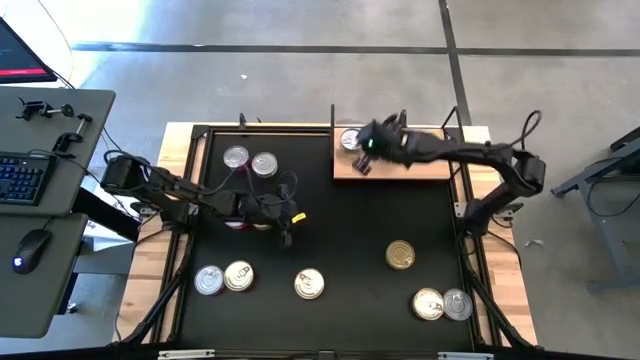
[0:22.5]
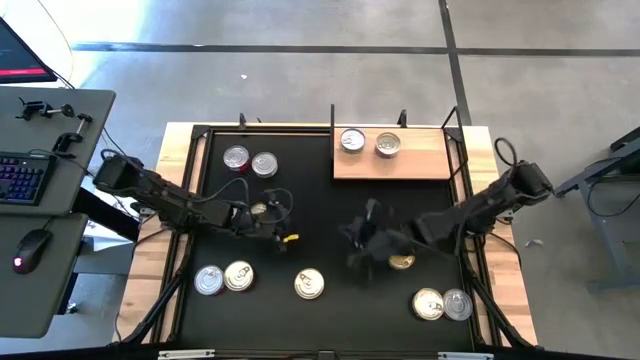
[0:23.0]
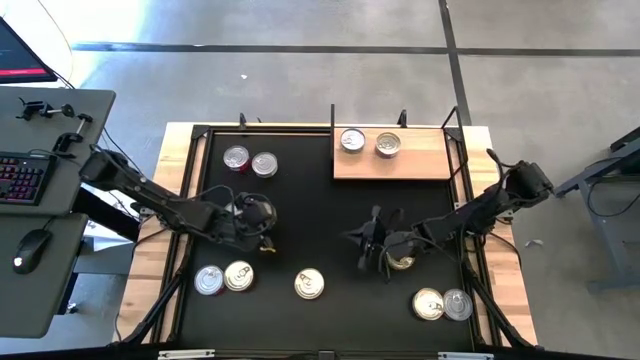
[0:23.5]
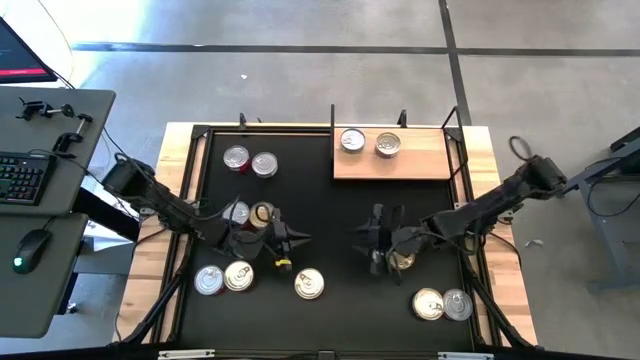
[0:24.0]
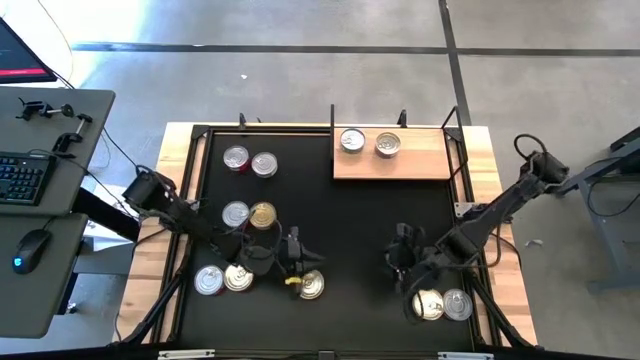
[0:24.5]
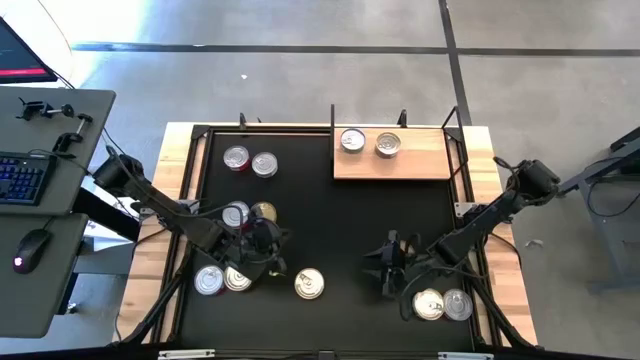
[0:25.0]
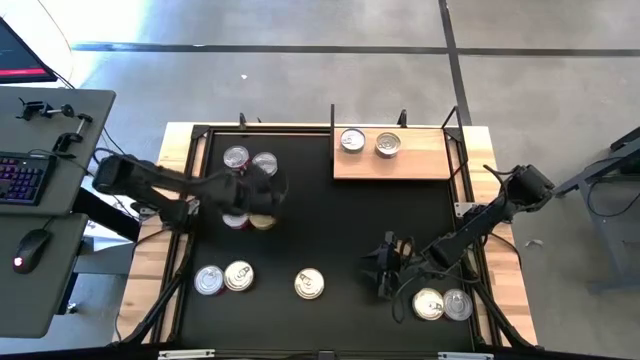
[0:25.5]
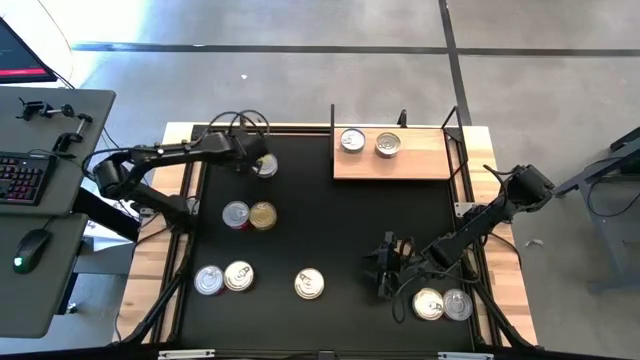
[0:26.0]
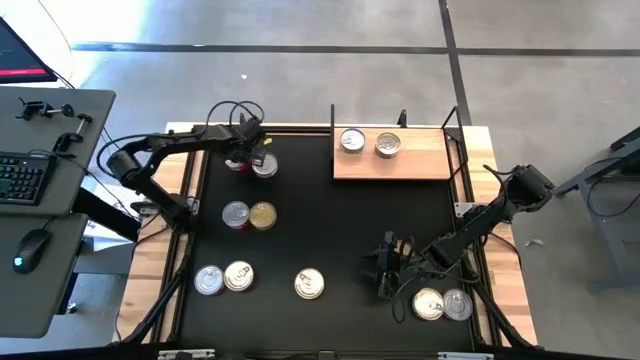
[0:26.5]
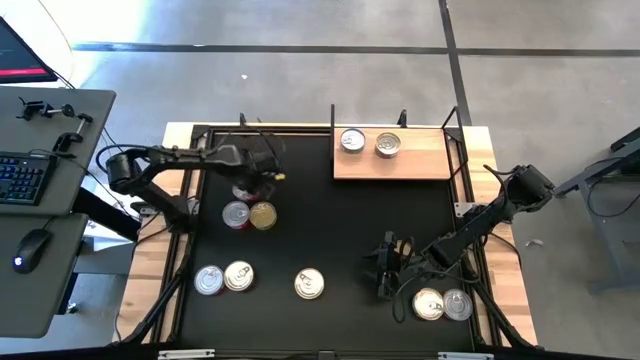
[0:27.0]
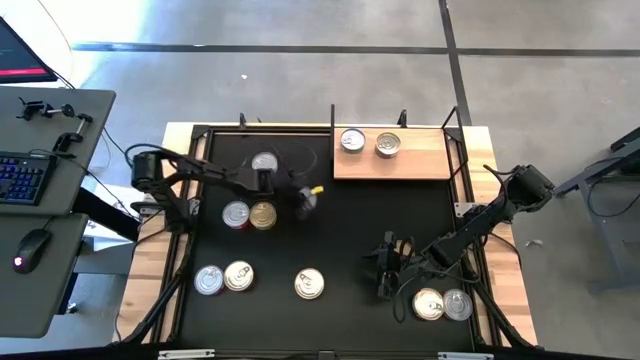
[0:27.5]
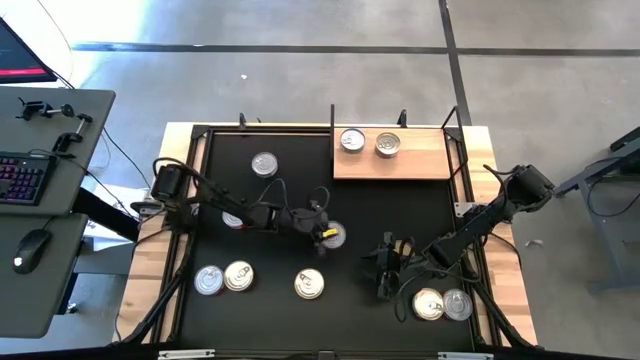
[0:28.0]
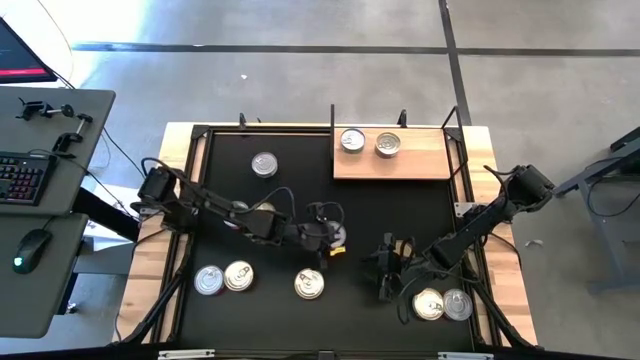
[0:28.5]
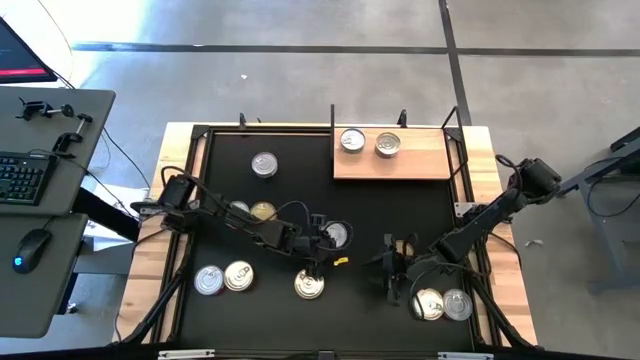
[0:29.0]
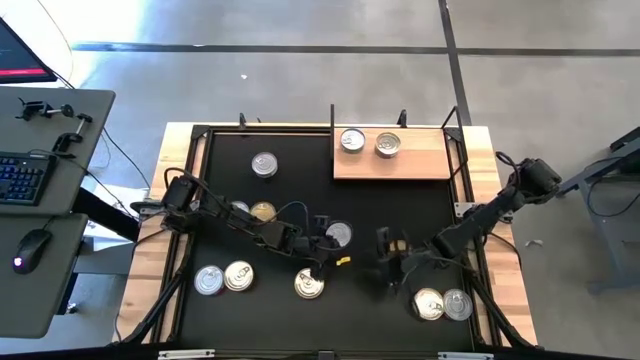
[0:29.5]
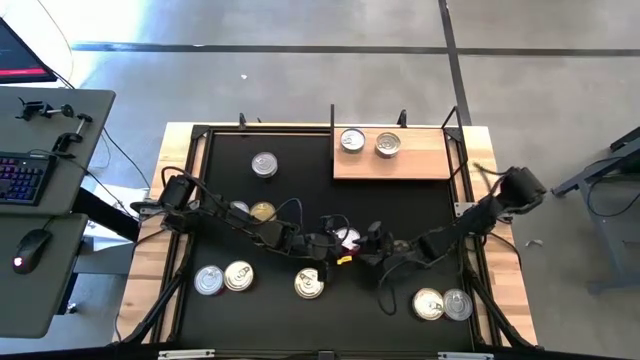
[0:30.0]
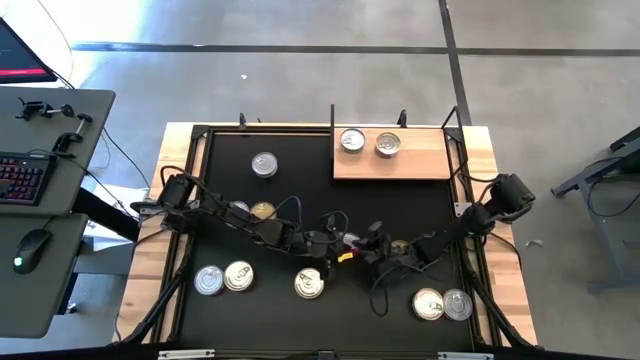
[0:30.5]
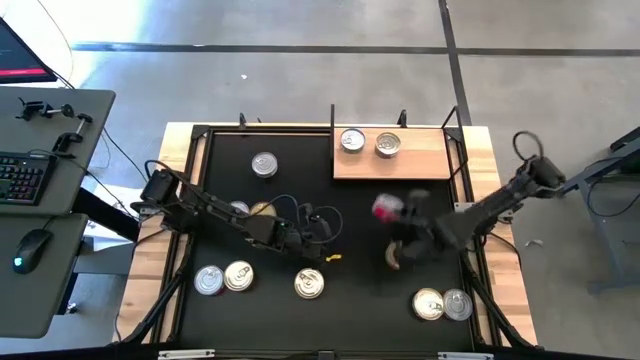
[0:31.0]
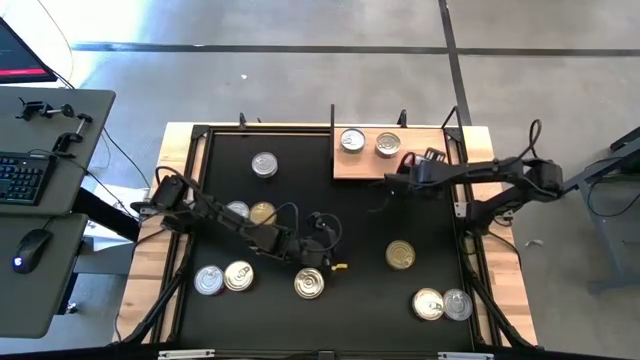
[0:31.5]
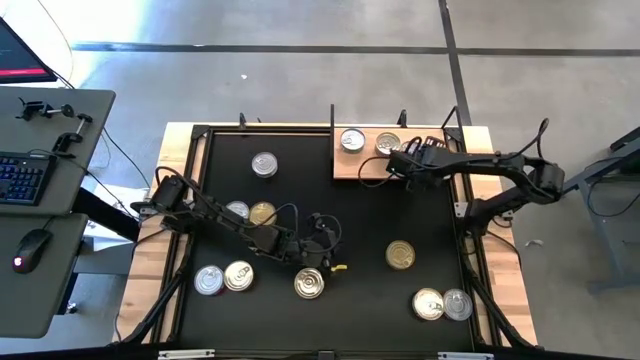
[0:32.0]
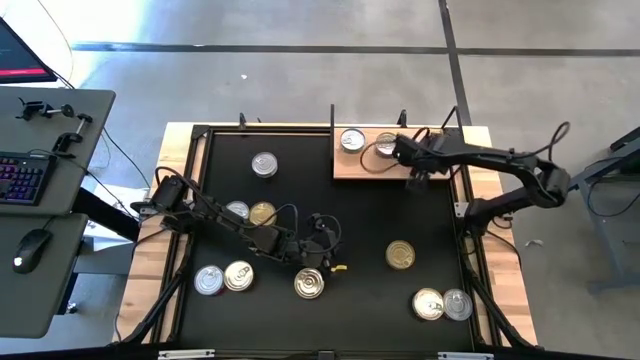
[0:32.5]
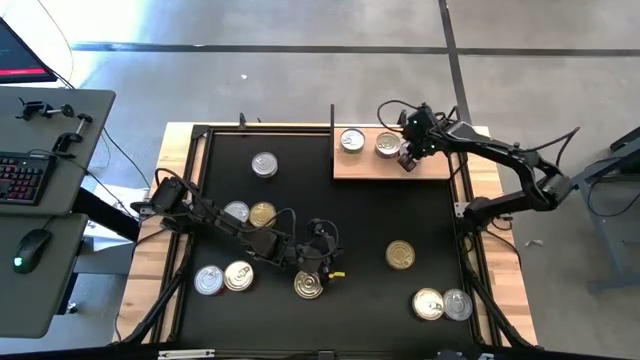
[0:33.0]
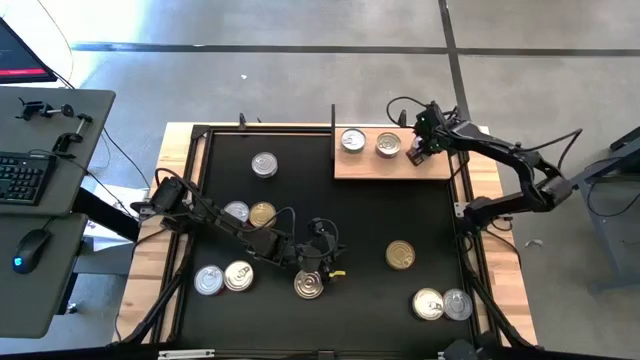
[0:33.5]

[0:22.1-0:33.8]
Task: Stack canned seafood by type on shelf
Put the red tuna can on the shelf

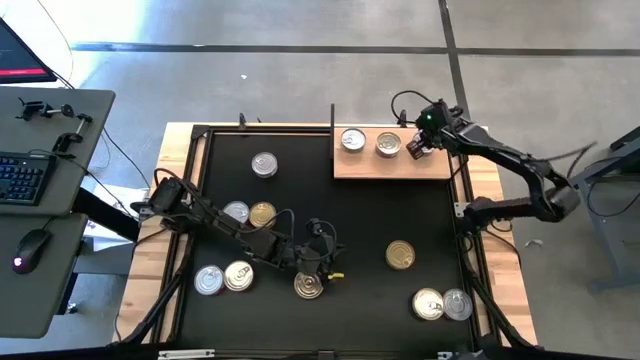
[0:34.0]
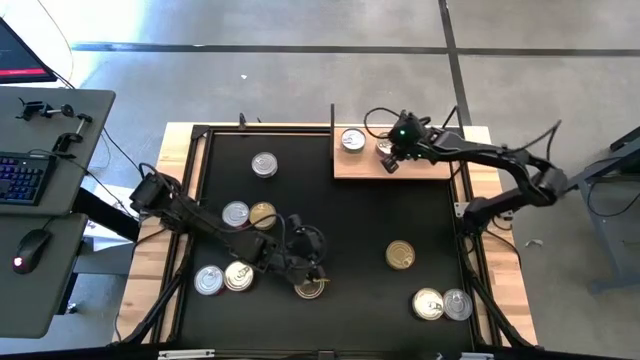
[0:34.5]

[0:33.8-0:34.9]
Adjust the green tuna can on the shelf

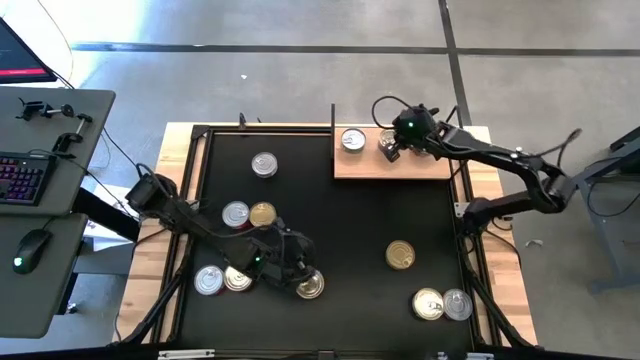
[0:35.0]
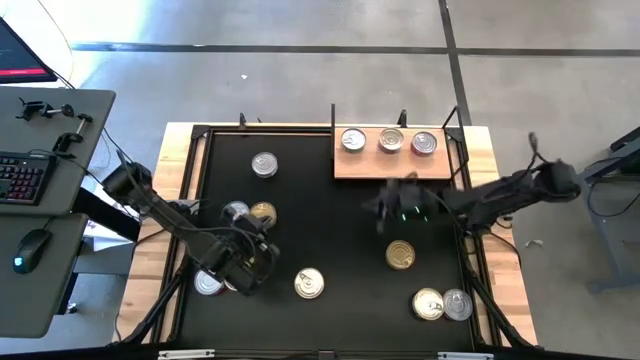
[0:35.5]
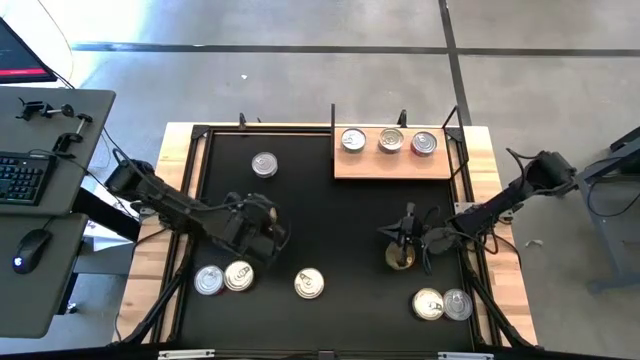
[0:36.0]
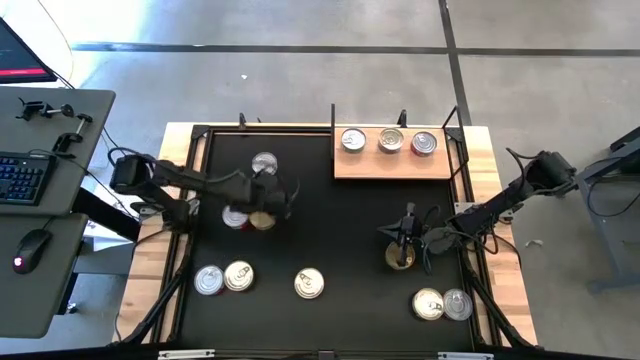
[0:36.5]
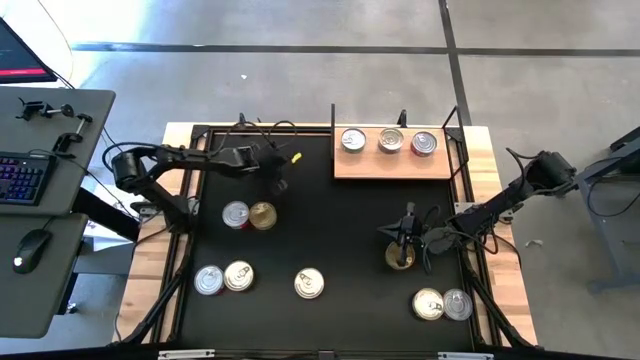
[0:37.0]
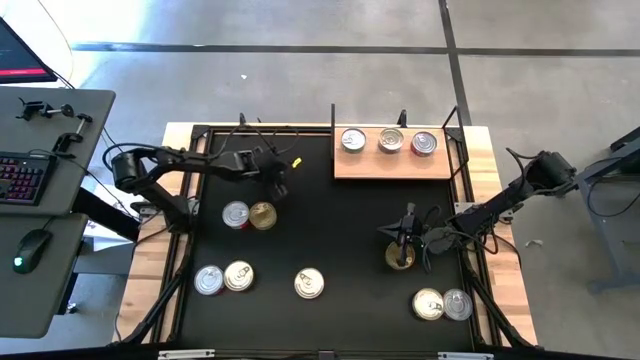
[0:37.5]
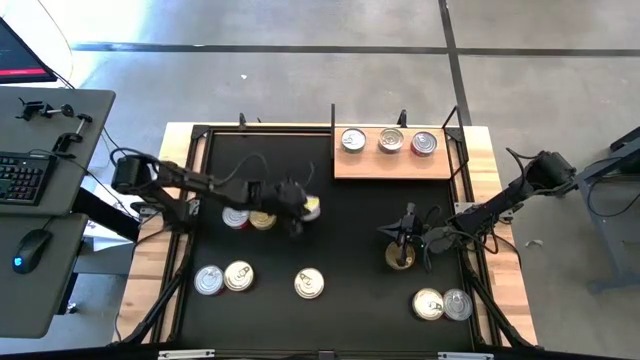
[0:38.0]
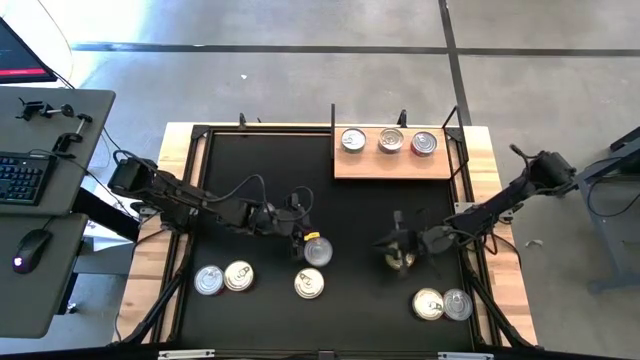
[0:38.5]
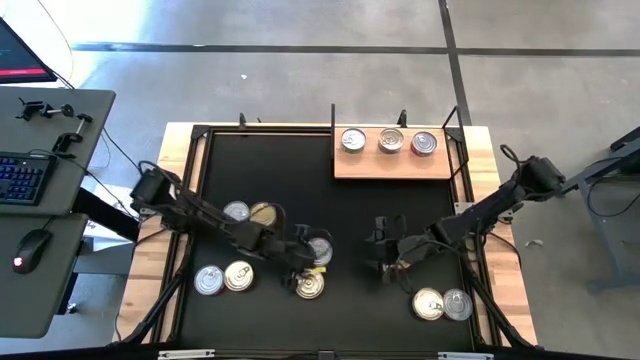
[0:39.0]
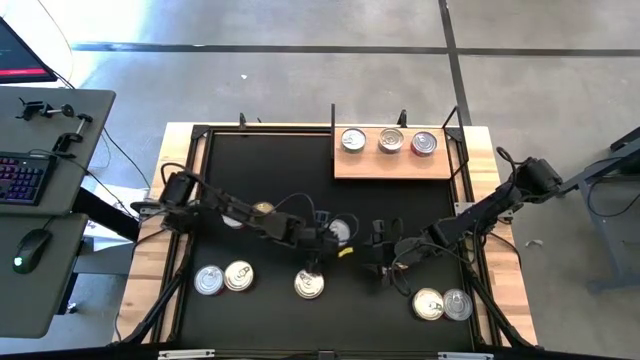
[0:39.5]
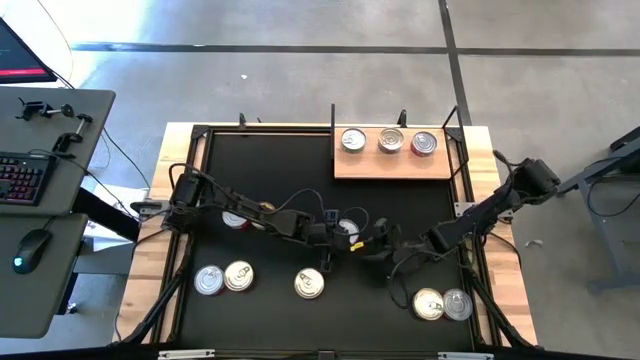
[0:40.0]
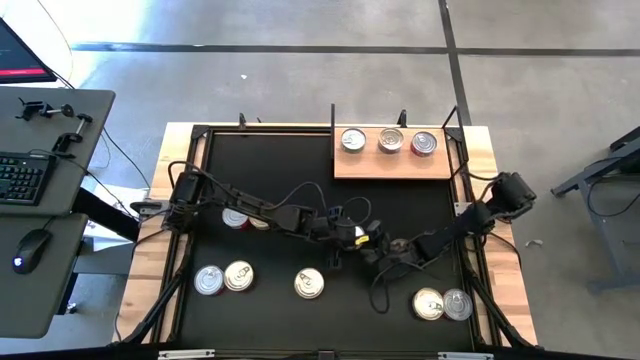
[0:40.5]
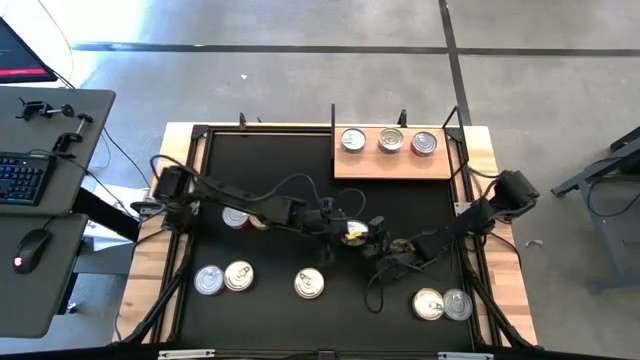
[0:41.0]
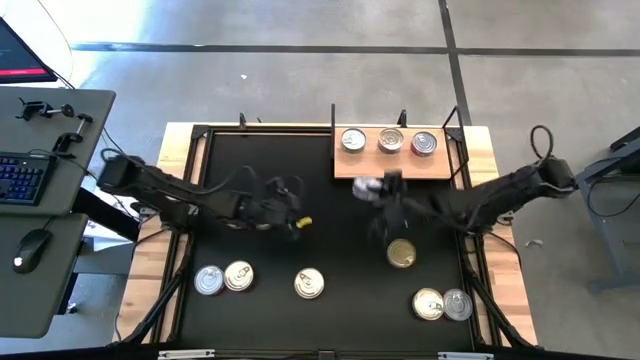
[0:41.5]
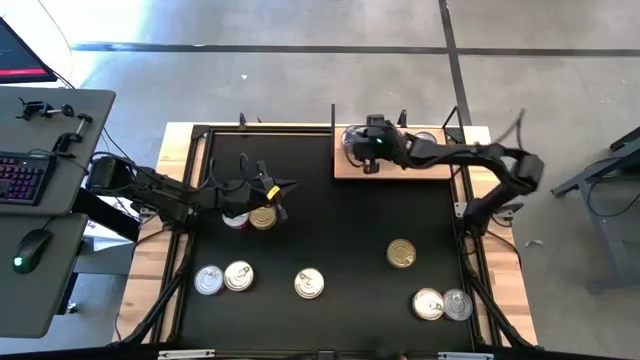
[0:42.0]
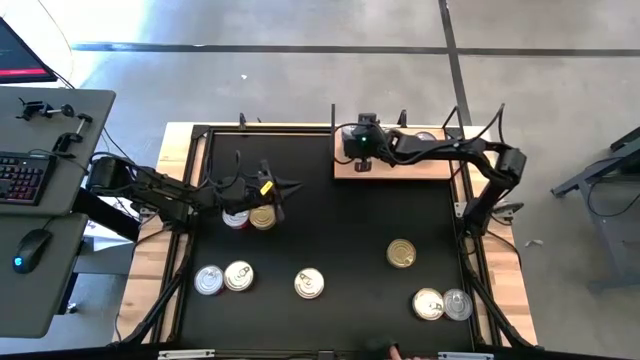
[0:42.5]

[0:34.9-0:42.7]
Stack the green tuna can on top of the other green tuna can on the shelf
